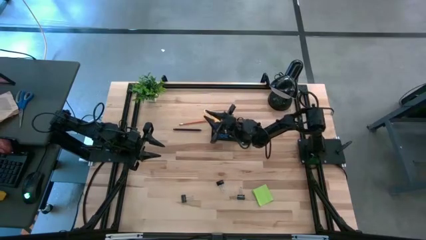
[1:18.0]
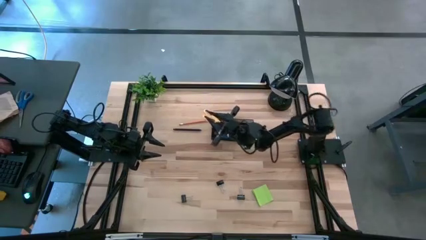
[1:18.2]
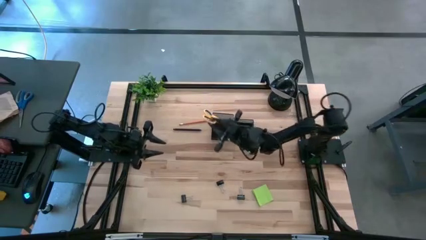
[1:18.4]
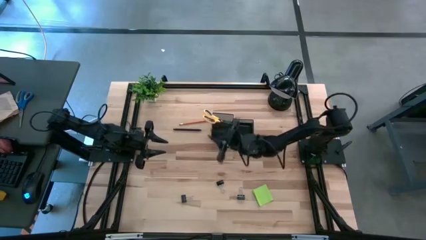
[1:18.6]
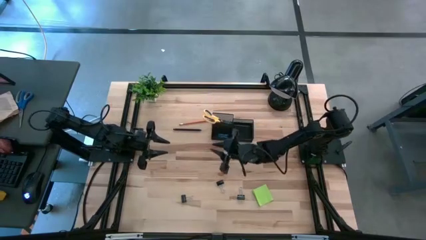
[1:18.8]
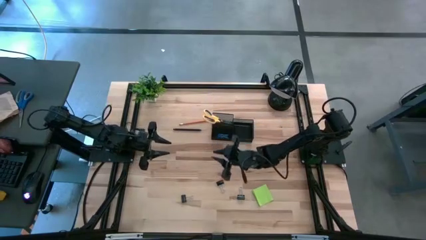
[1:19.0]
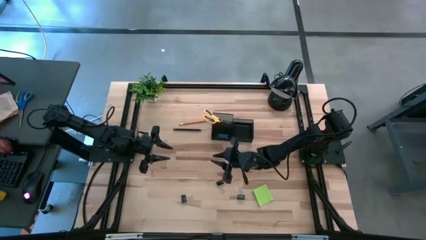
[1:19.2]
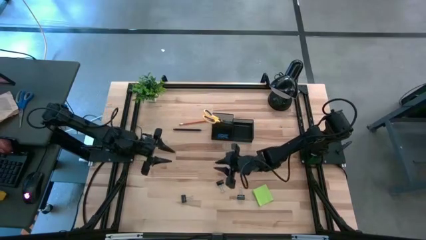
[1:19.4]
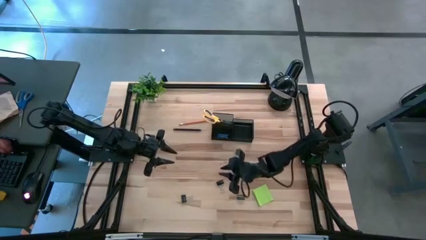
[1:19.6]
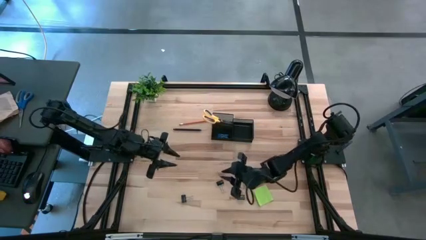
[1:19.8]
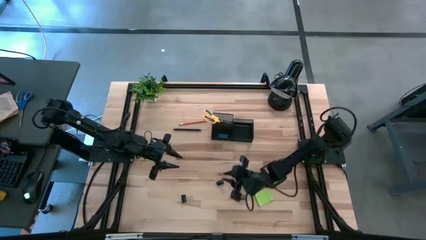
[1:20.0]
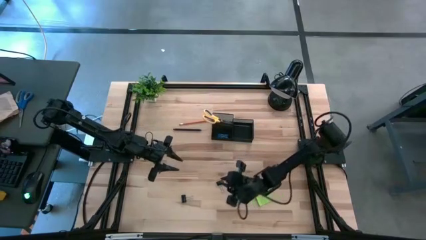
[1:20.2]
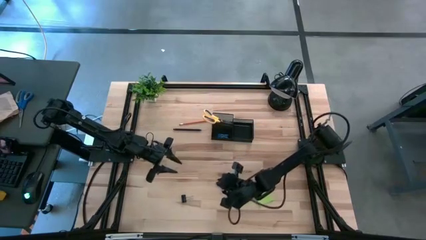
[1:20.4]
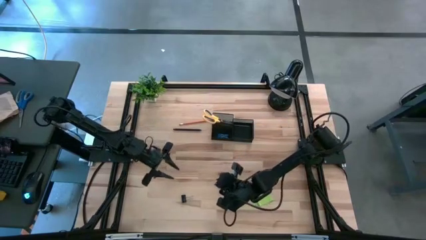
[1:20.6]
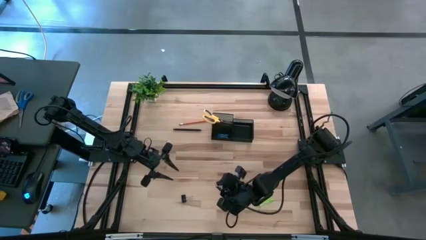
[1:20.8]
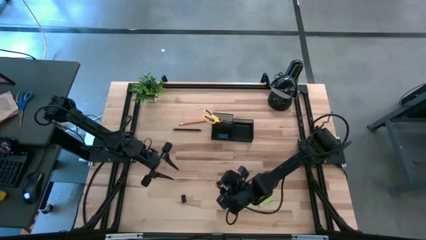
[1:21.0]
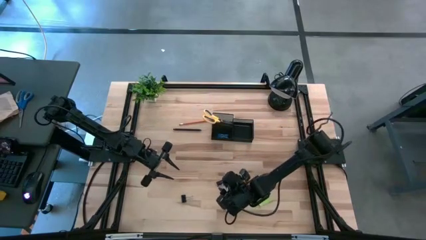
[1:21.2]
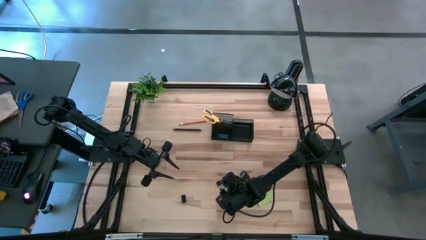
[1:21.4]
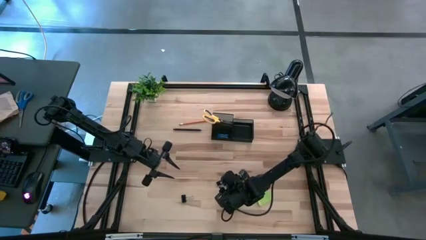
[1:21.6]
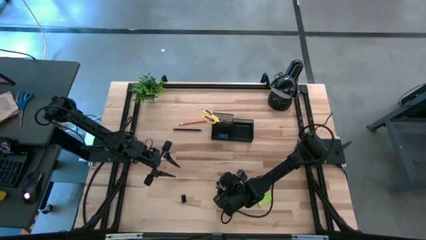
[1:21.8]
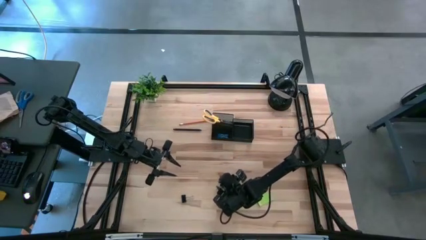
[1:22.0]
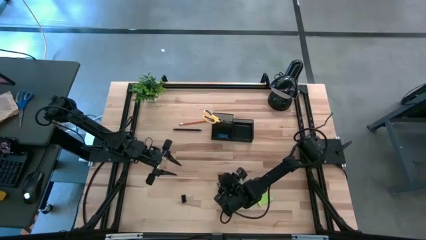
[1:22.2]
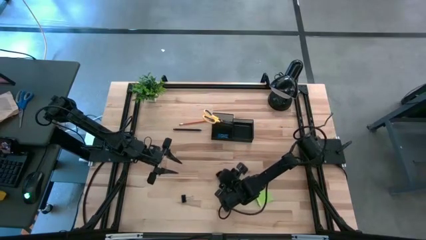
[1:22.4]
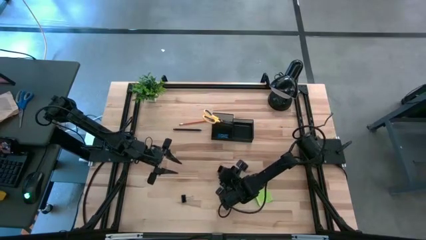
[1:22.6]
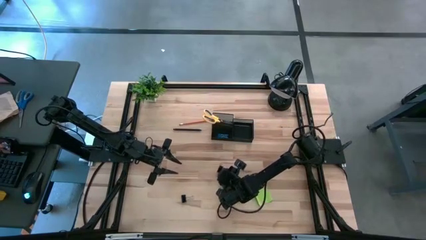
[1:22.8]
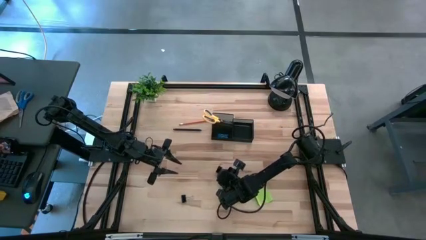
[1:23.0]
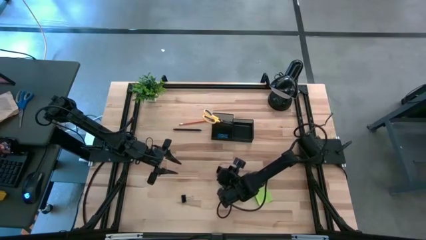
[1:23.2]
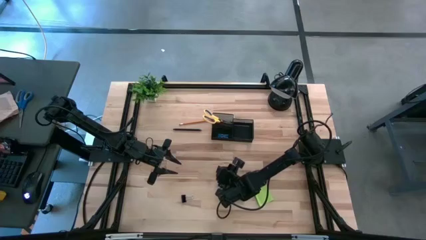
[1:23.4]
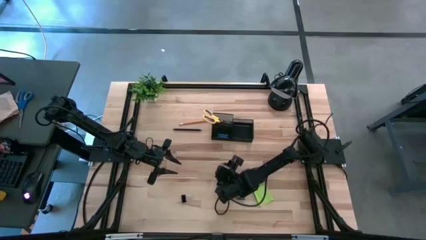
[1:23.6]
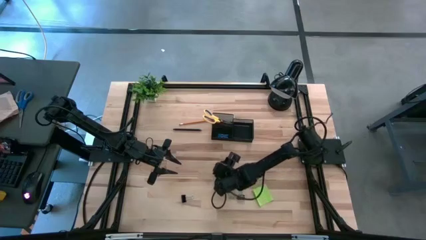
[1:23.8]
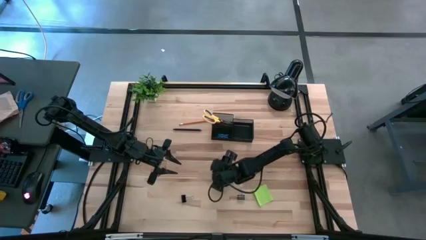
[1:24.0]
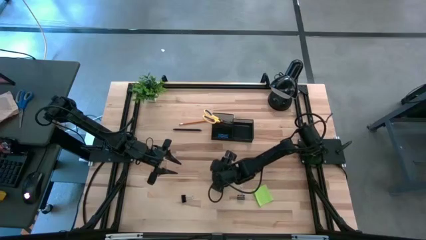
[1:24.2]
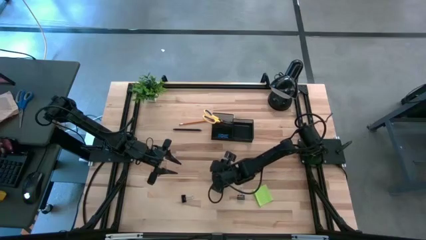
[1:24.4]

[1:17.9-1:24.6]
Task: Pick and place office supplies into organizer
Put the black binder clip into the desk organizer

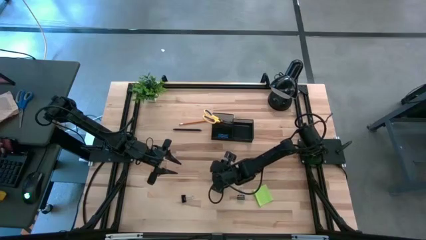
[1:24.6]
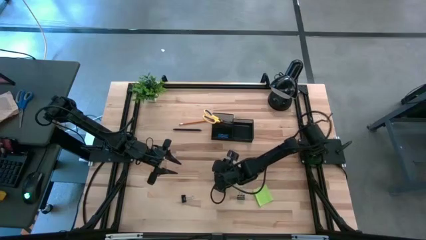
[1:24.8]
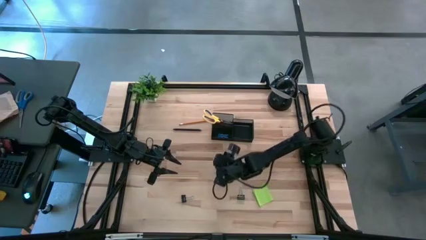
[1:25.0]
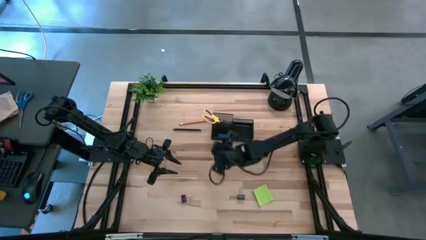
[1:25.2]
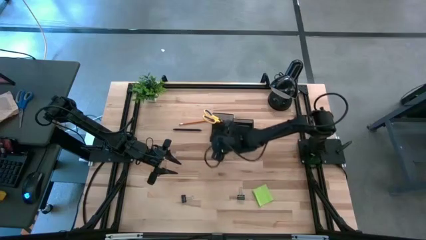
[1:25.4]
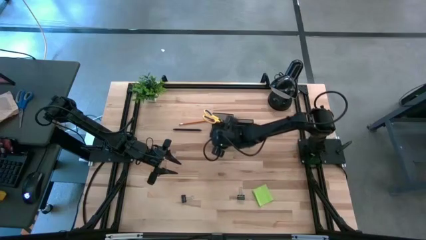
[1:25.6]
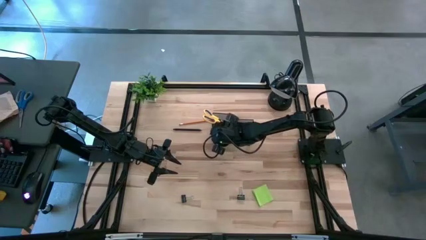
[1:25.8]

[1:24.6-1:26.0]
Put the black binder clip into the desk organizer

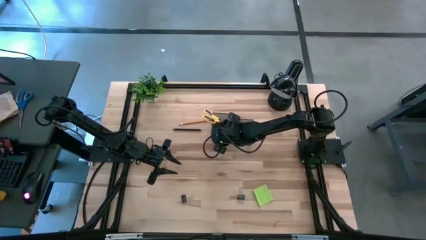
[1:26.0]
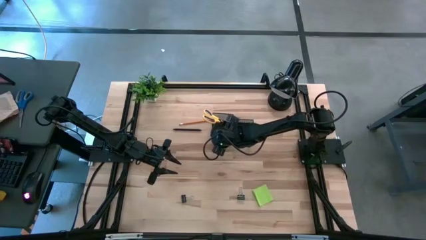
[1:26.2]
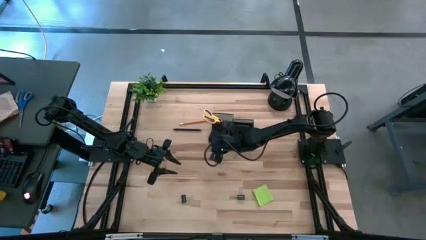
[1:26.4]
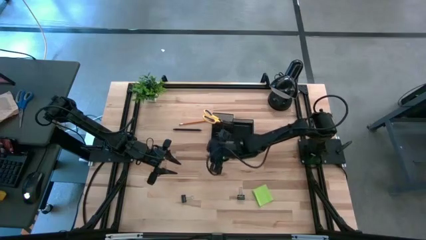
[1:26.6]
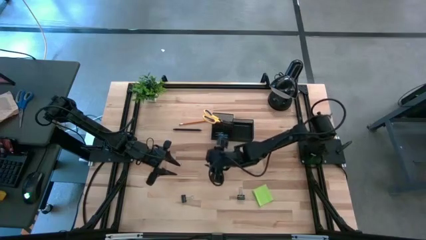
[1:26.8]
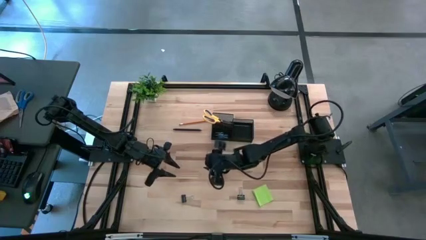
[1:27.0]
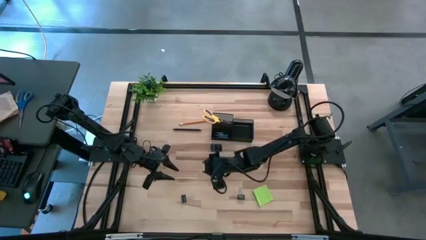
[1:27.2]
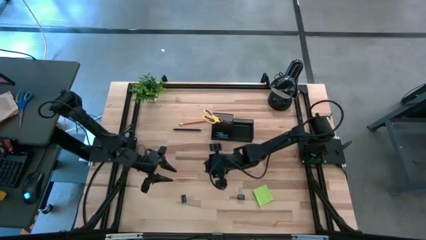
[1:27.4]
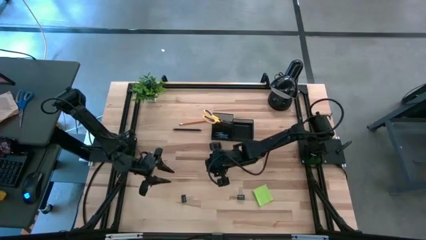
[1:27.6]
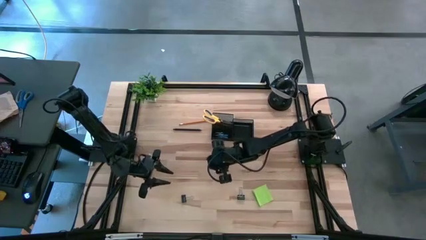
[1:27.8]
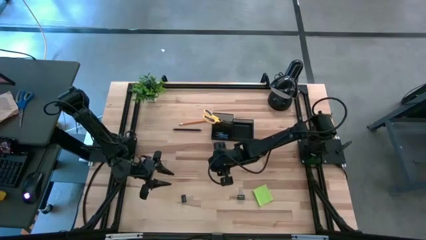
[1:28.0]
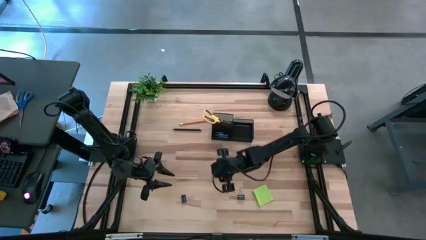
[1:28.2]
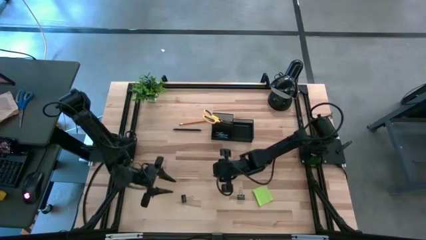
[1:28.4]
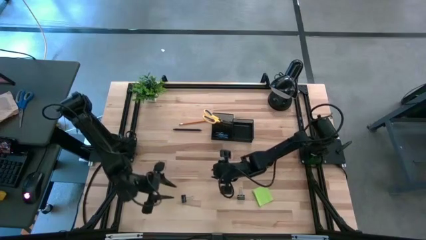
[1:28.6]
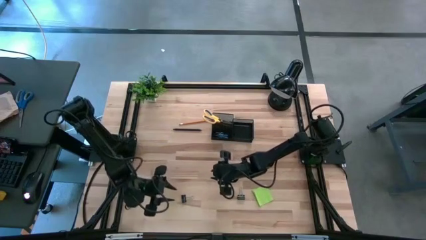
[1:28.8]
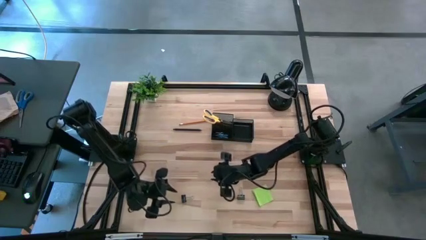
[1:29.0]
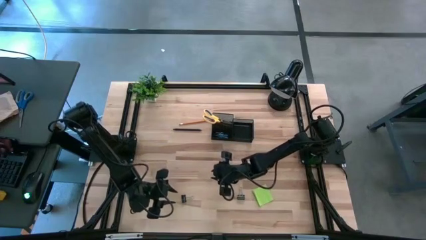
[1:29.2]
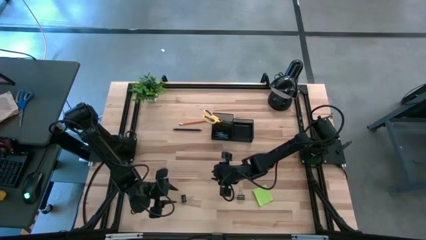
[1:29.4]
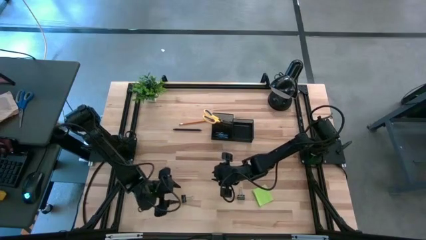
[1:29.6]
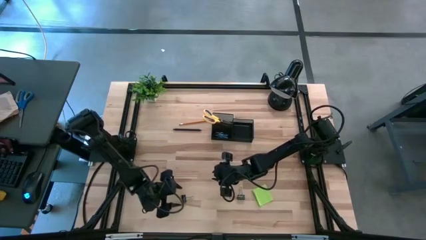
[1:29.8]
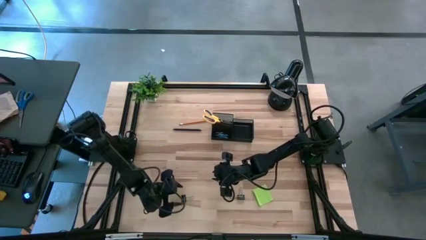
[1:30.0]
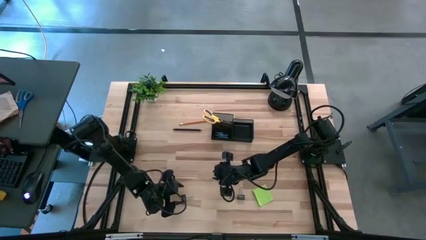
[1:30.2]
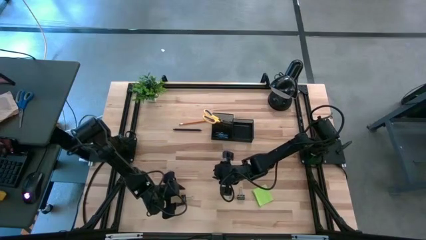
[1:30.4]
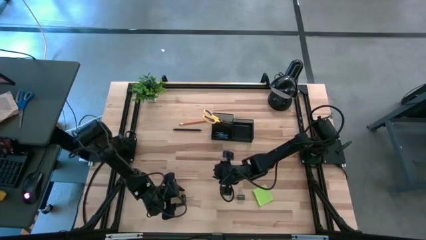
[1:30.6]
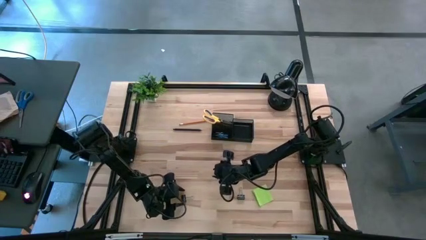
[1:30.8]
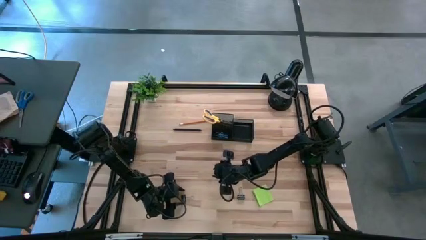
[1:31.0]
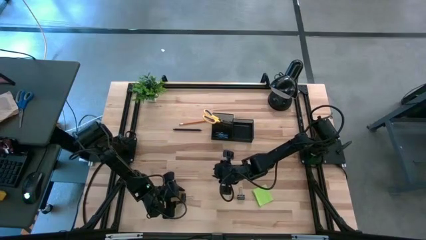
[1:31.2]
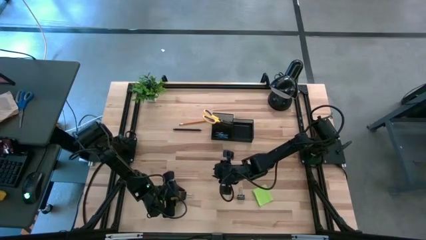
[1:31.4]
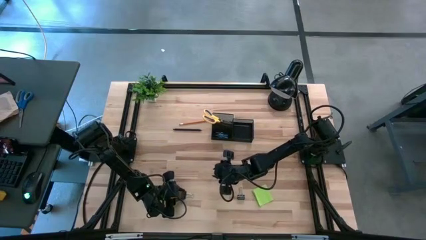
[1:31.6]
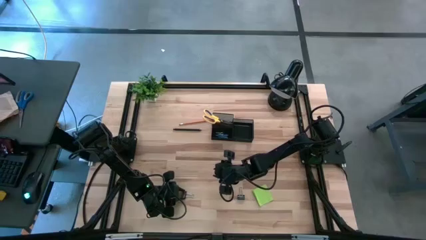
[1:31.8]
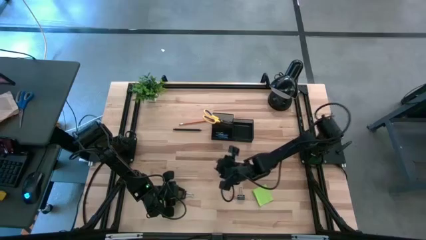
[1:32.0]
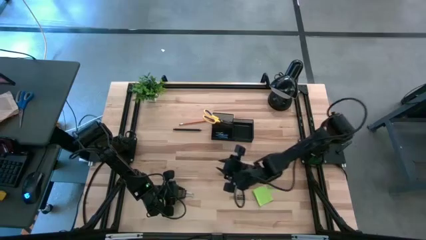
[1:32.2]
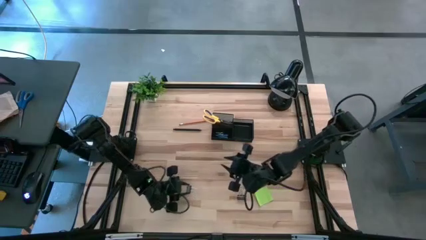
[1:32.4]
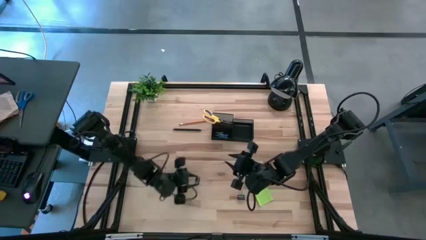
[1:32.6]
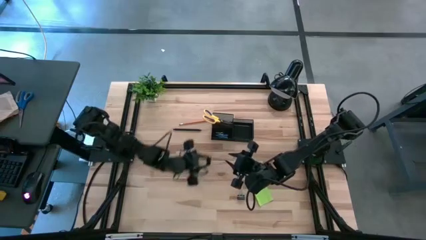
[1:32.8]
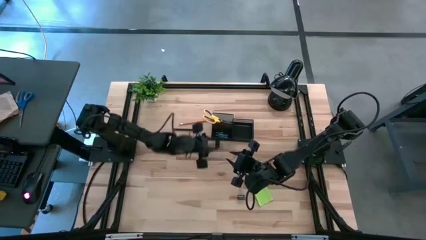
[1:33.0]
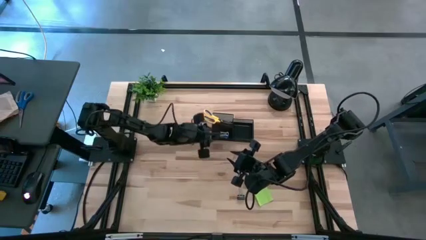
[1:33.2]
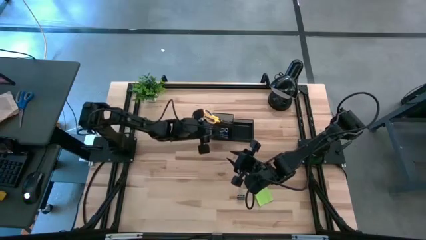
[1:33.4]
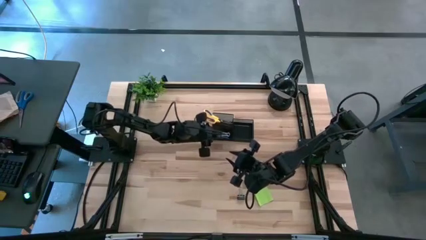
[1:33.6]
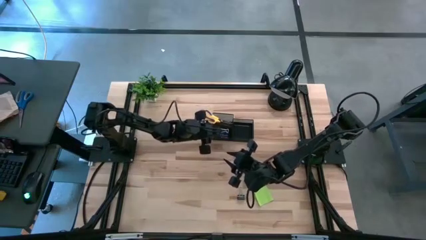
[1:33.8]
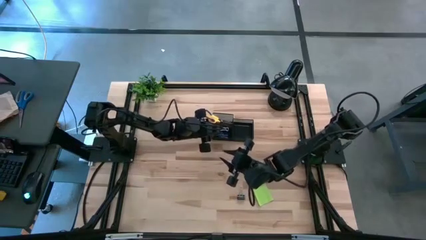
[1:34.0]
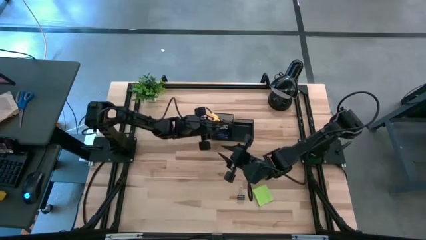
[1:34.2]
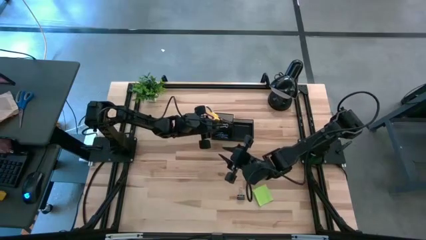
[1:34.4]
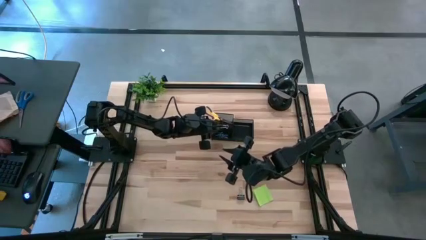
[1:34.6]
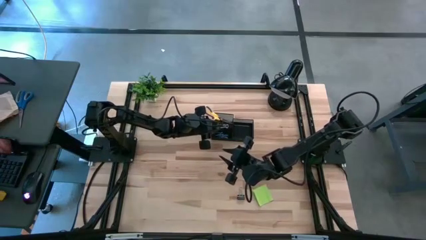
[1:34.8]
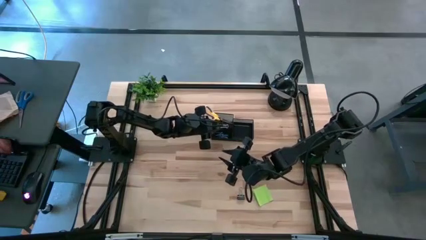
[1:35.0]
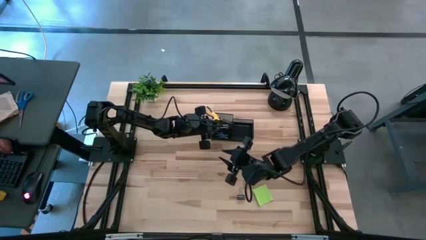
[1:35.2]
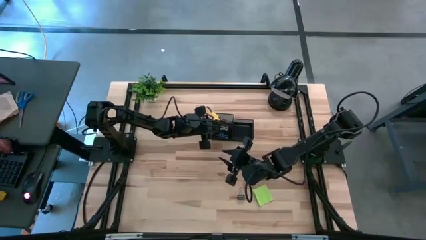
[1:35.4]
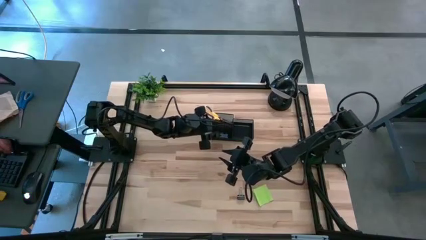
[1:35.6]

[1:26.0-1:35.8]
Put the black binder clip into the desk organizer
